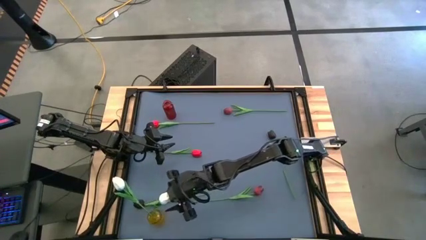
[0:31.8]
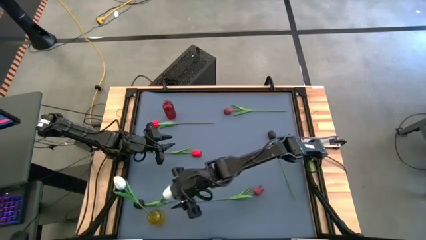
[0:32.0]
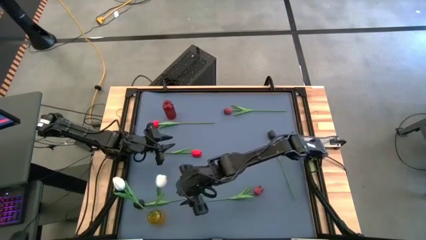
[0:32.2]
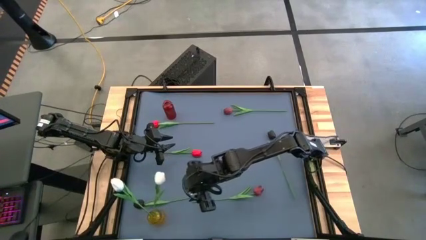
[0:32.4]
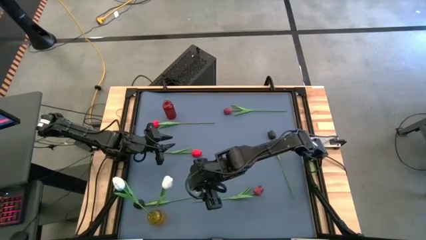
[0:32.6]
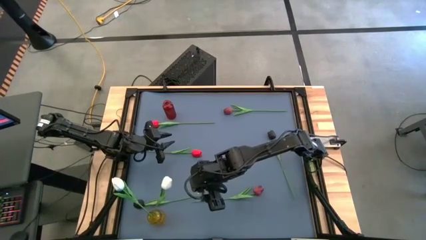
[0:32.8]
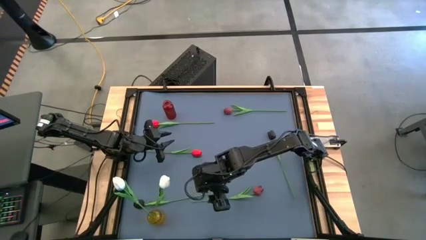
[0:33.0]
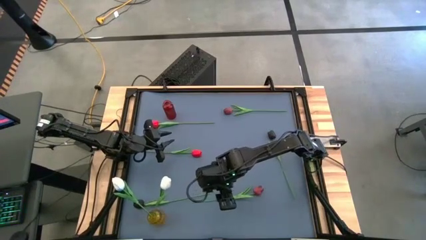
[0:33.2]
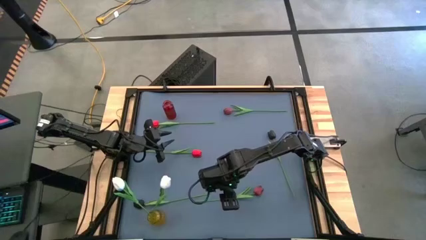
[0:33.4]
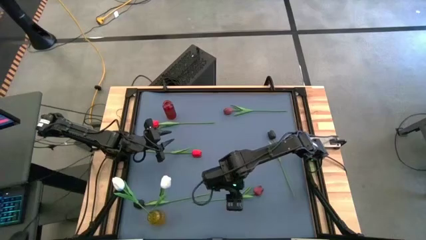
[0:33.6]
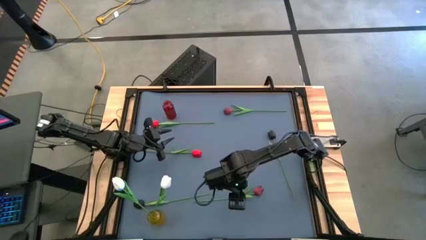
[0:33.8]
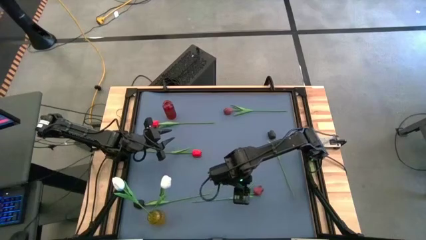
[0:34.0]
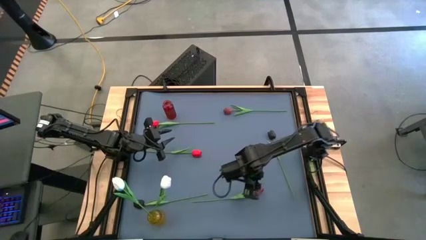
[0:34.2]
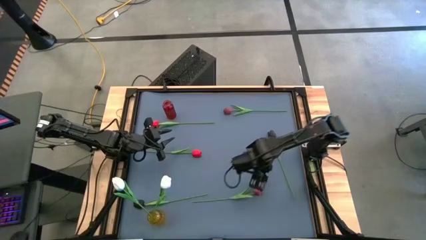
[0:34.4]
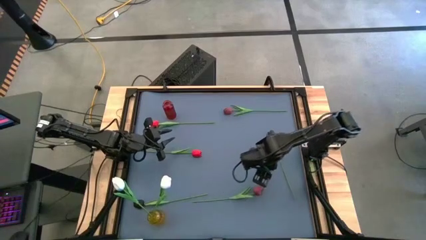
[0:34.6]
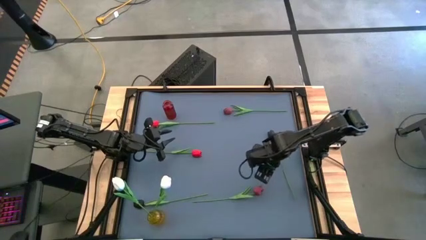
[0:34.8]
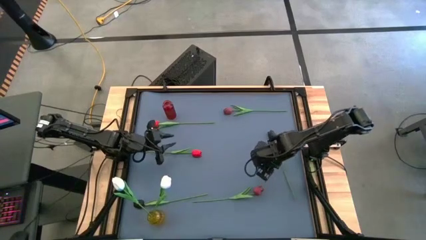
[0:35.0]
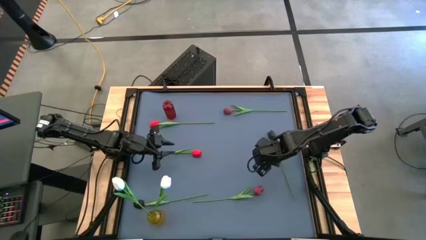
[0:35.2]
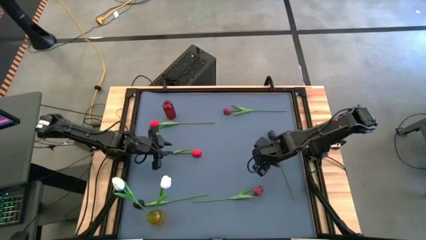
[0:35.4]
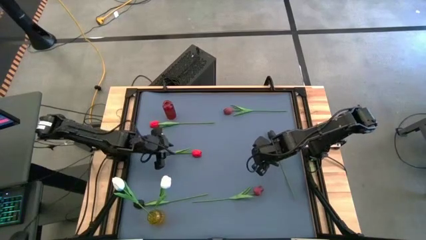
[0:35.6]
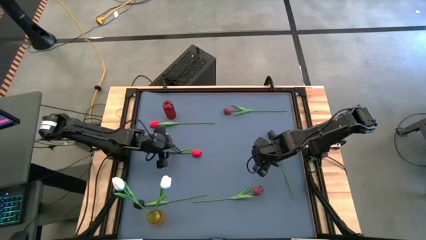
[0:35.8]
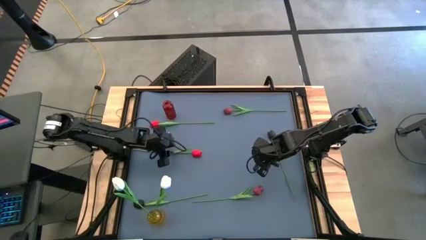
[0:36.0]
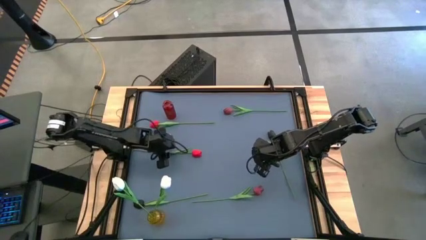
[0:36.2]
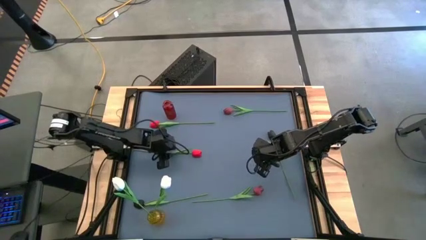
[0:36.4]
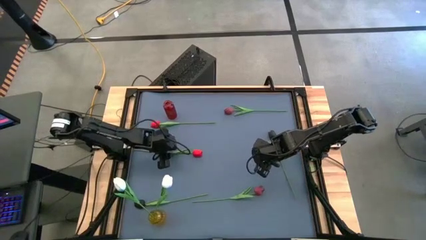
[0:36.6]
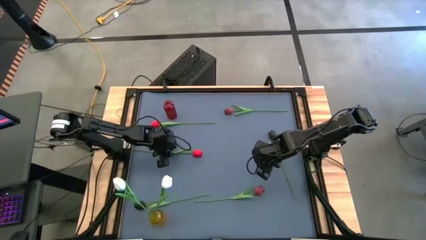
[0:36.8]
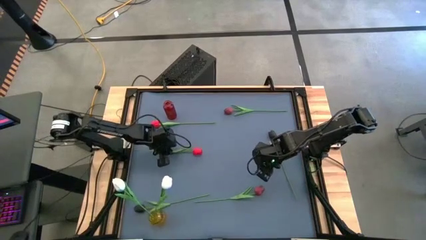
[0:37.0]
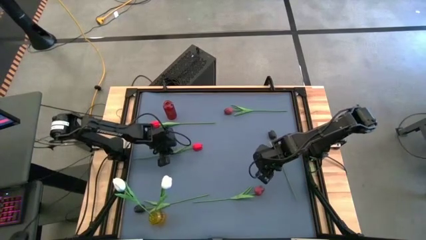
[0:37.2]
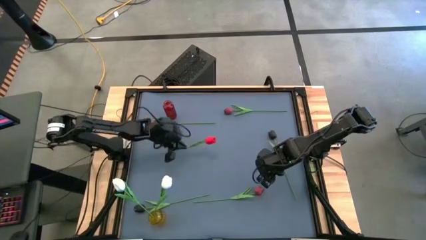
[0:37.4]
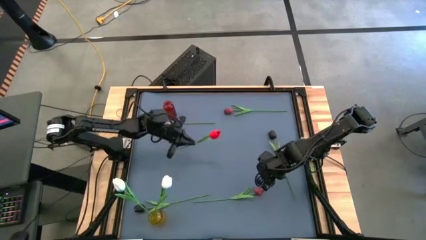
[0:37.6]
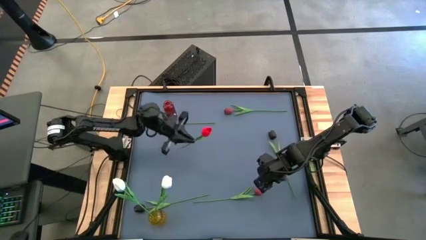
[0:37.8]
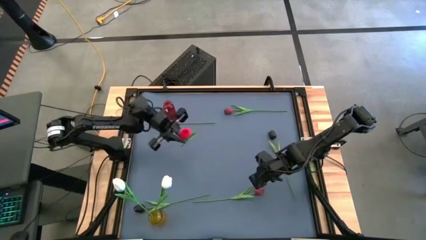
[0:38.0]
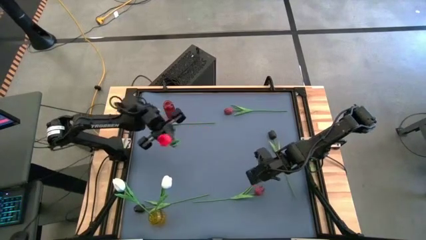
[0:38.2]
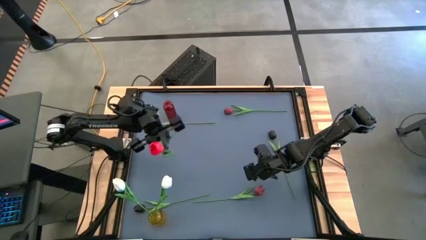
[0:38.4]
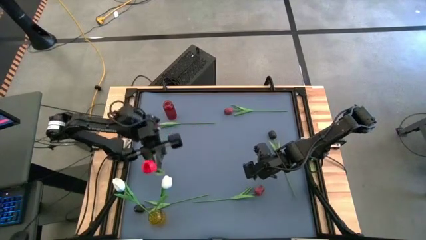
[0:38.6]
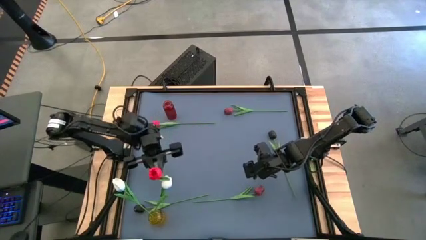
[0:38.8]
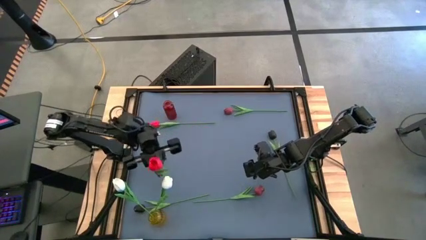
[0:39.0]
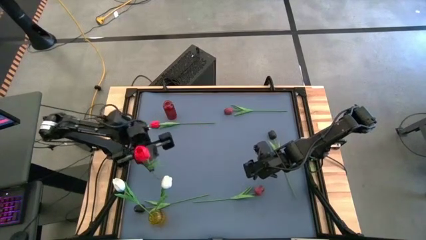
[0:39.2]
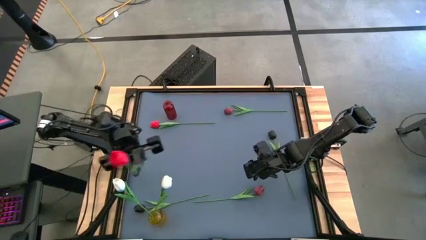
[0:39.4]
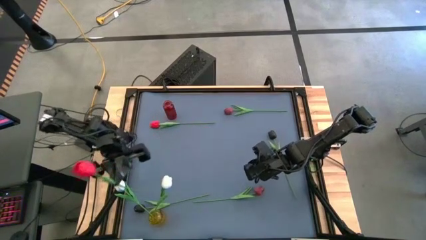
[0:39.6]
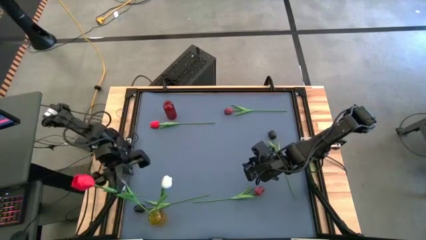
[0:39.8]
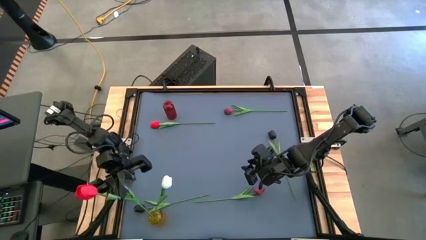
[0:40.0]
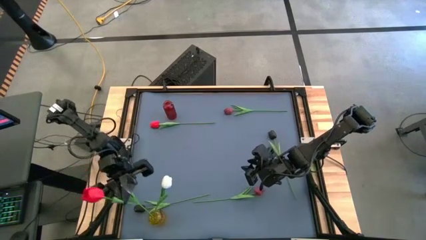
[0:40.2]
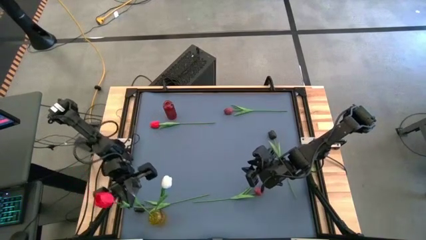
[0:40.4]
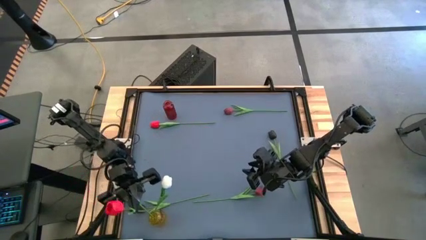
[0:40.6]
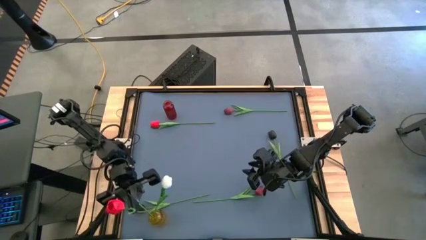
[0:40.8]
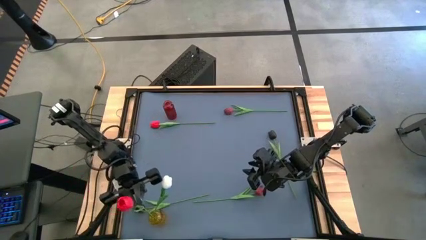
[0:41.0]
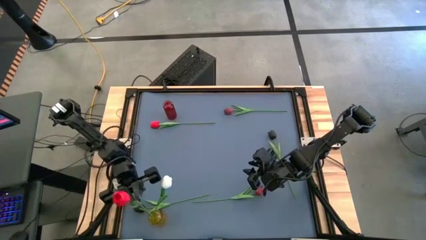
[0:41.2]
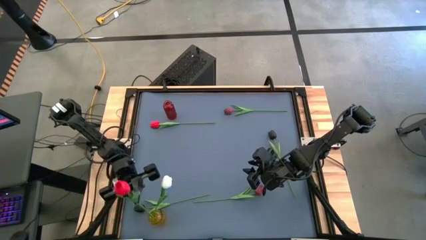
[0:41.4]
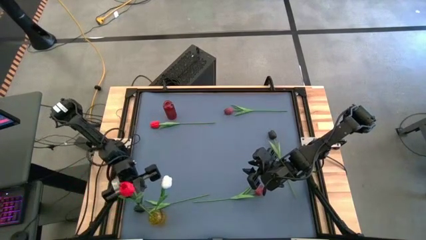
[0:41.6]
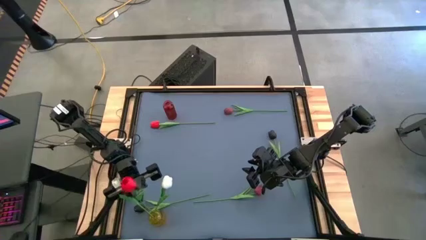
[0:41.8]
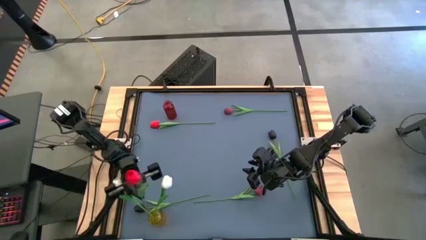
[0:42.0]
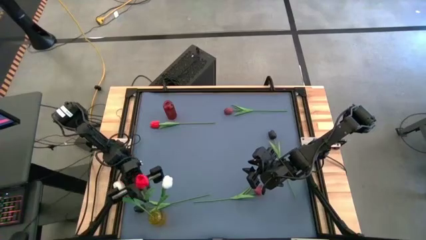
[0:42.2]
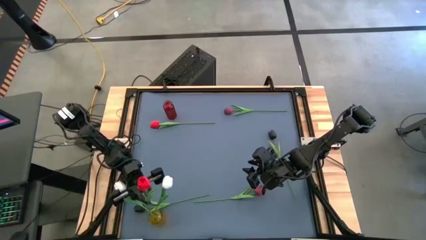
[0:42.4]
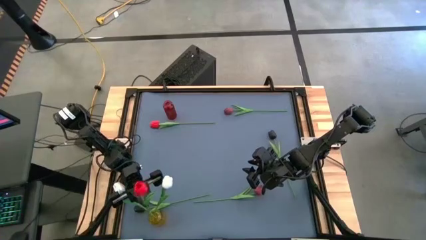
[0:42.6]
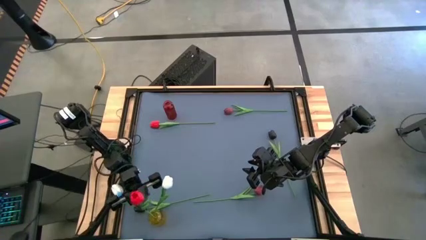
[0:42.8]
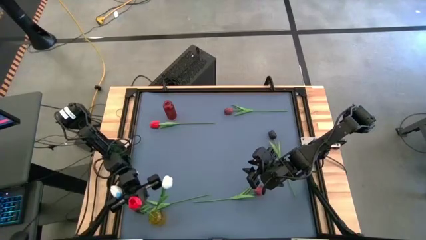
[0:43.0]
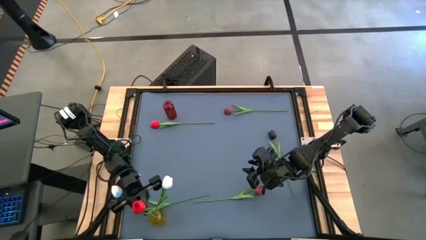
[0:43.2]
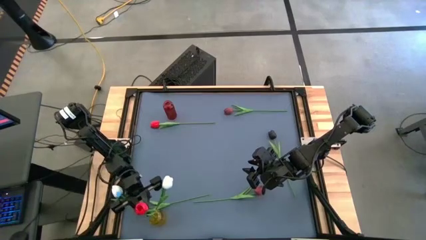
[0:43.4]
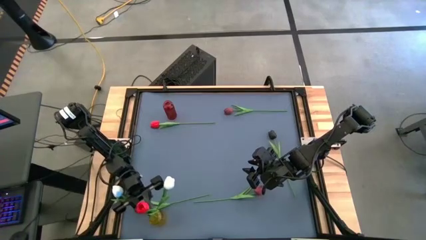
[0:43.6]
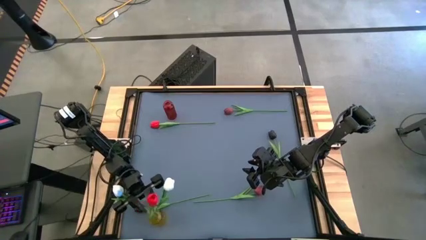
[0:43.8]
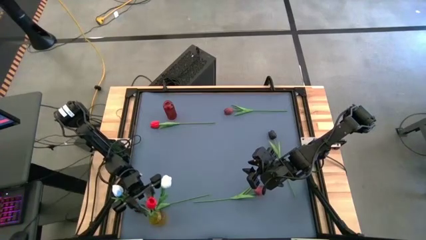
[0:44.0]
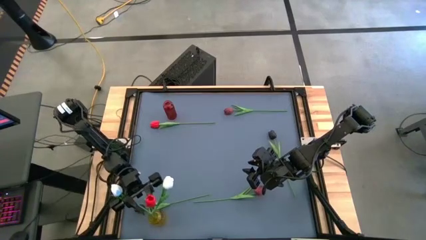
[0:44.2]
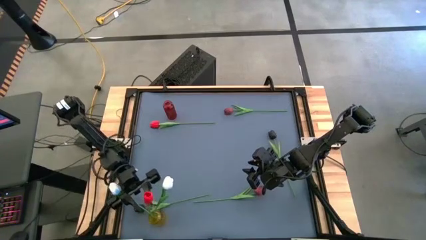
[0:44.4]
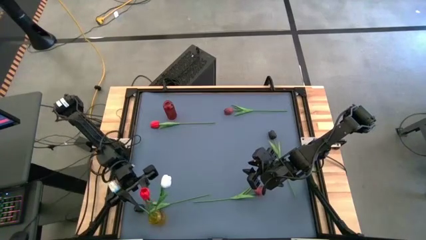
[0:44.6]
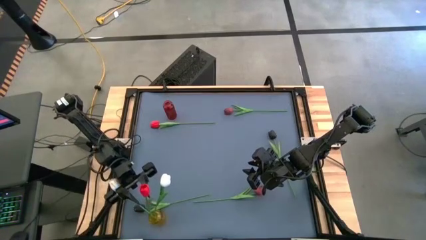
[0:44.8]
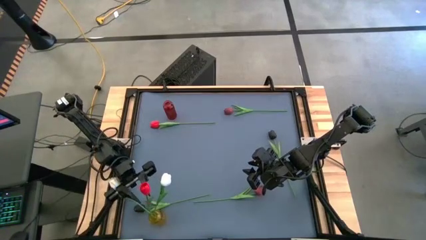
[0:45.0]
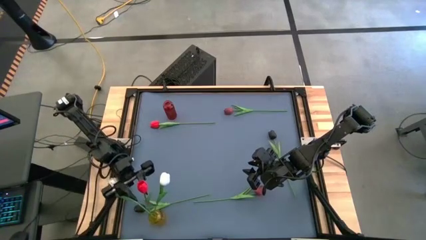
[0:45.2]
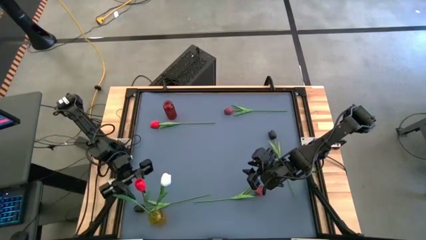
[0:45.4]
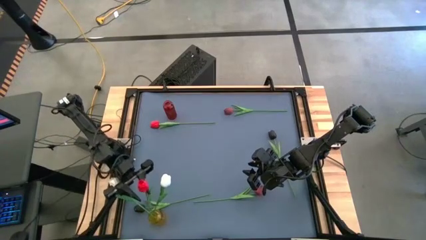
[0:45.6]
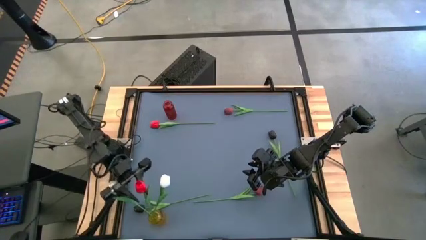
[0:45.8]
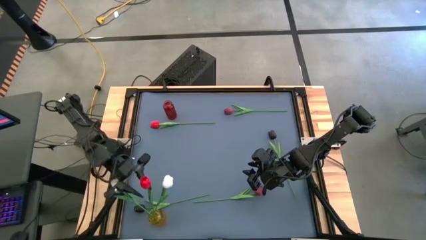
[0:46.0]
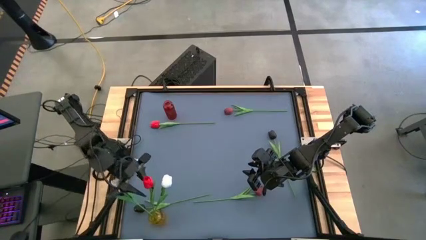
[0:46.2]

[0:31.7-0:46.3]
Task: Sort flowers into vase by color
Put the bottom left red tulip into the yellow vase
